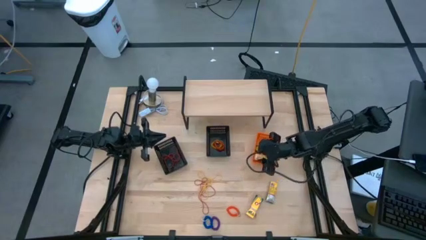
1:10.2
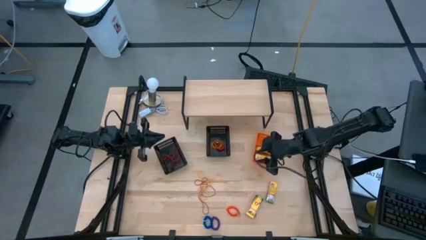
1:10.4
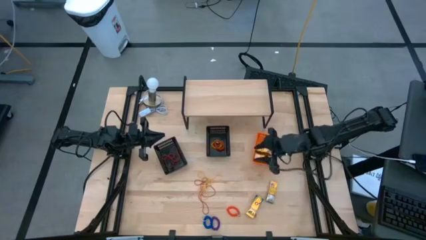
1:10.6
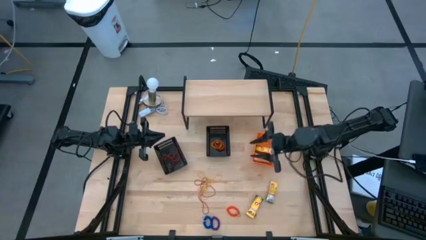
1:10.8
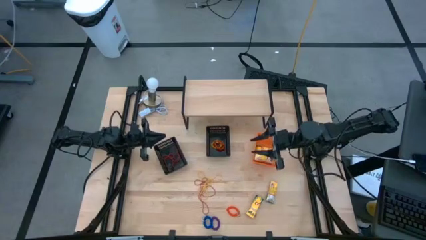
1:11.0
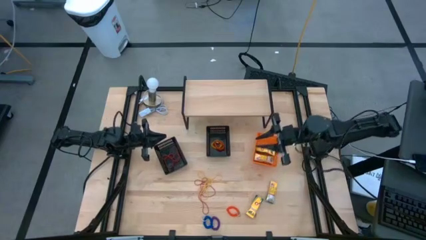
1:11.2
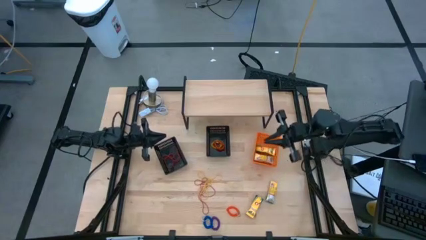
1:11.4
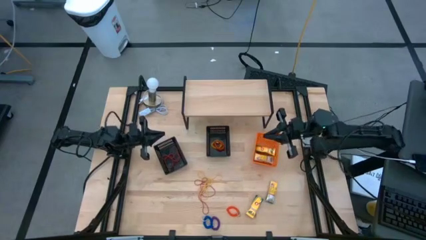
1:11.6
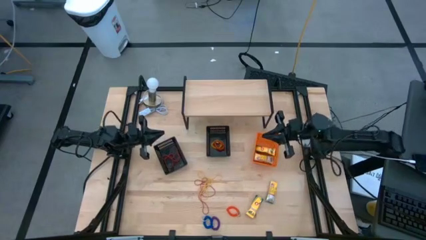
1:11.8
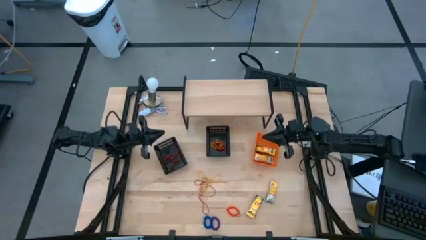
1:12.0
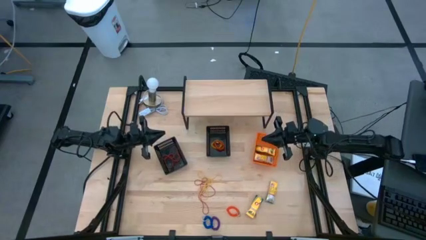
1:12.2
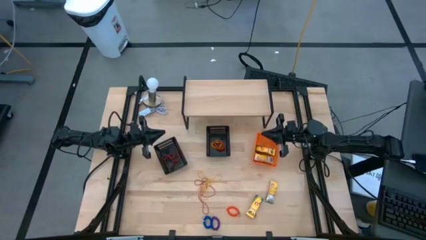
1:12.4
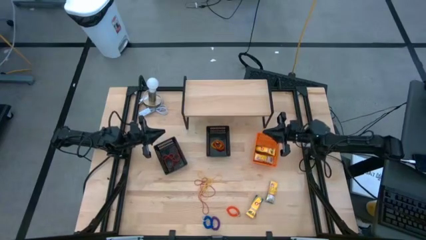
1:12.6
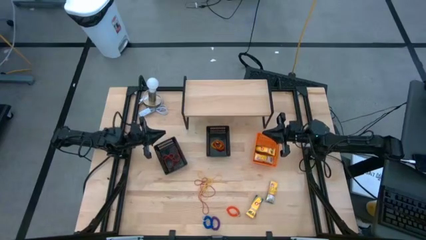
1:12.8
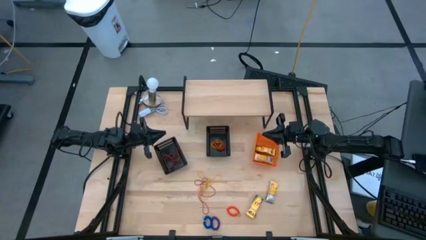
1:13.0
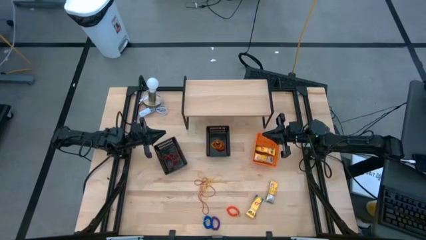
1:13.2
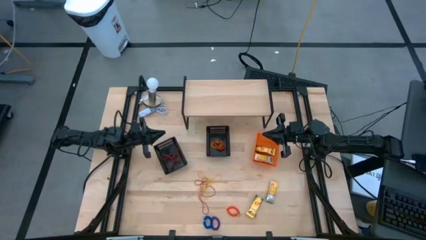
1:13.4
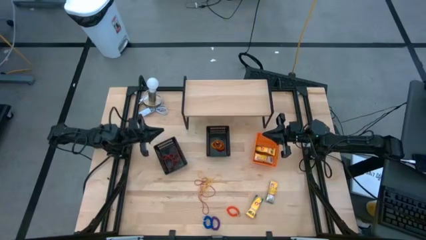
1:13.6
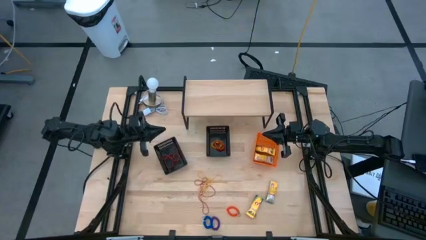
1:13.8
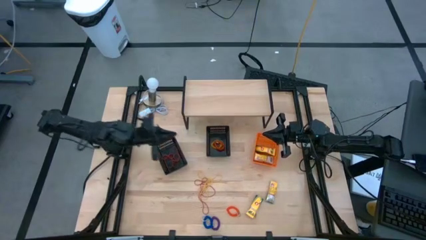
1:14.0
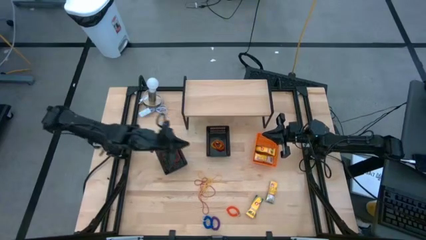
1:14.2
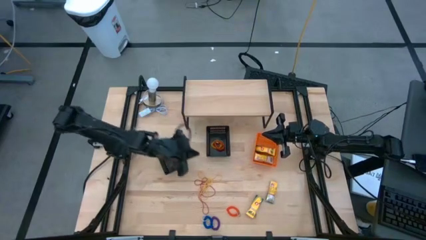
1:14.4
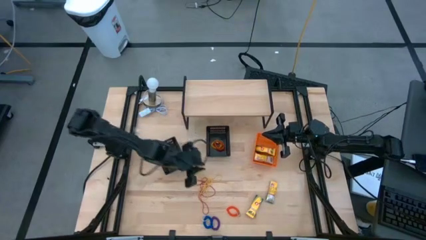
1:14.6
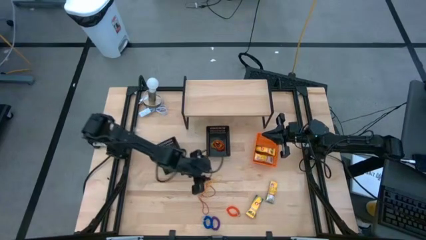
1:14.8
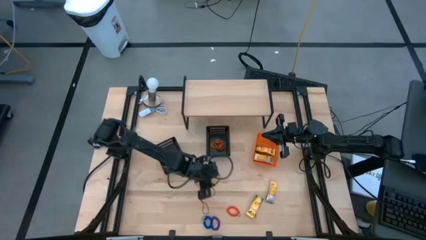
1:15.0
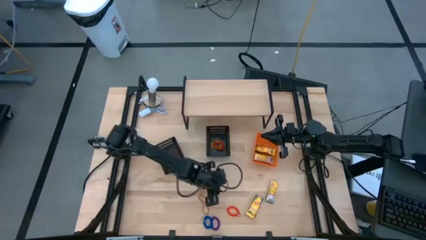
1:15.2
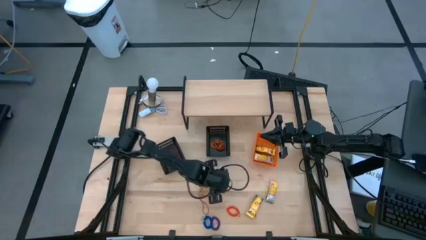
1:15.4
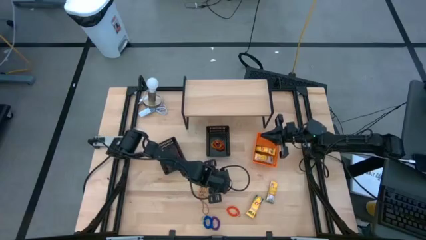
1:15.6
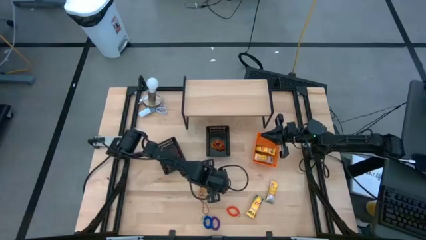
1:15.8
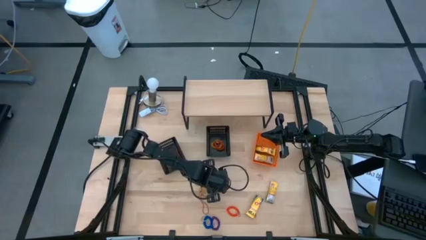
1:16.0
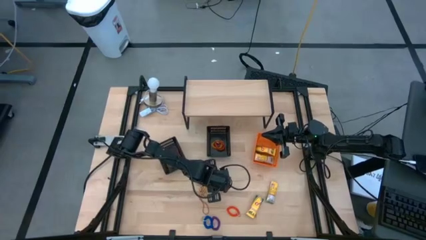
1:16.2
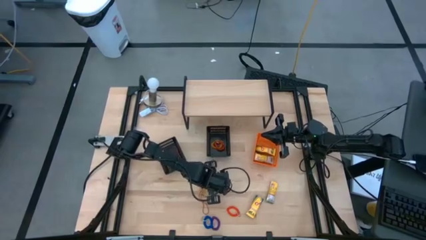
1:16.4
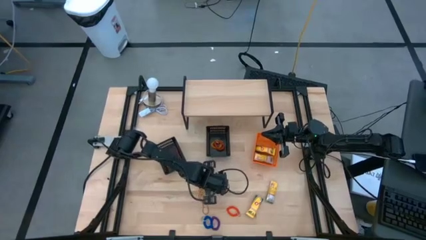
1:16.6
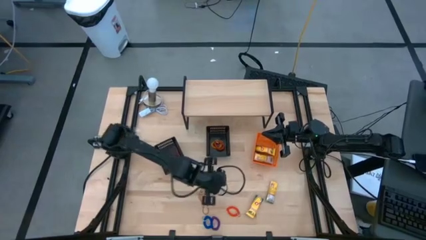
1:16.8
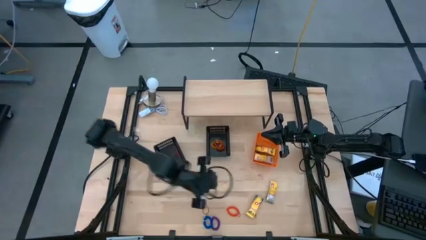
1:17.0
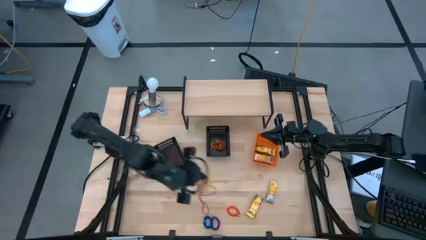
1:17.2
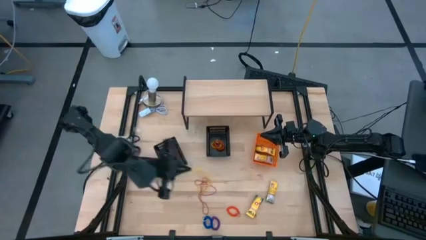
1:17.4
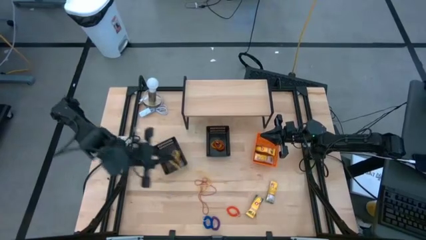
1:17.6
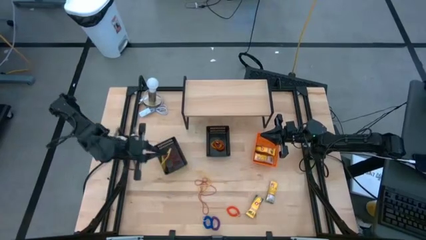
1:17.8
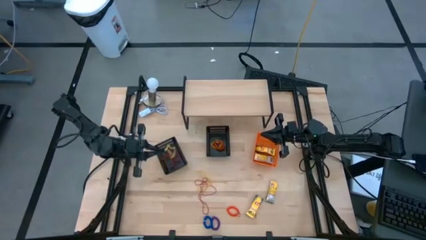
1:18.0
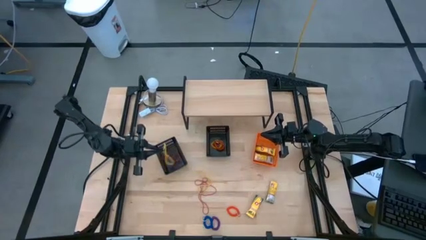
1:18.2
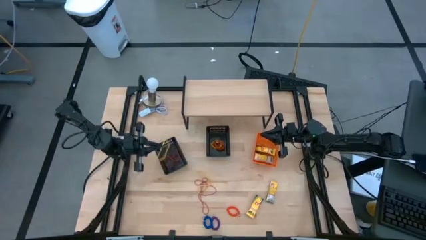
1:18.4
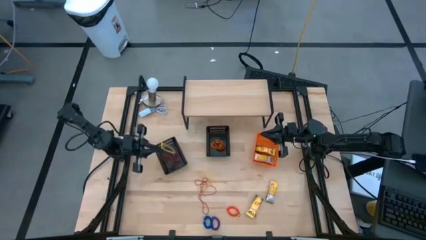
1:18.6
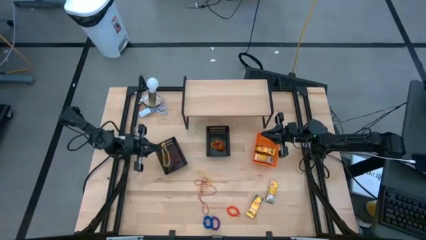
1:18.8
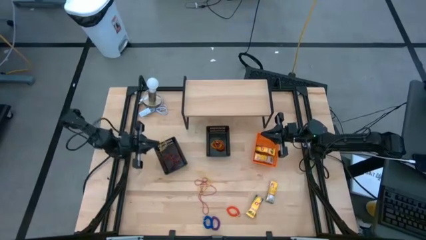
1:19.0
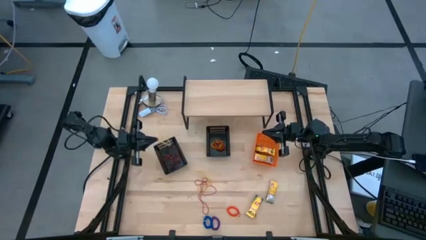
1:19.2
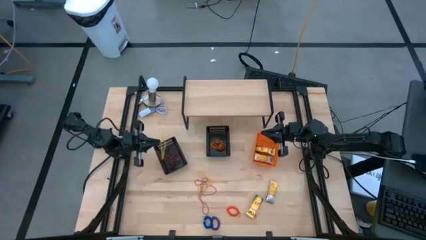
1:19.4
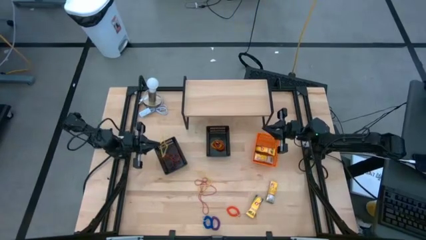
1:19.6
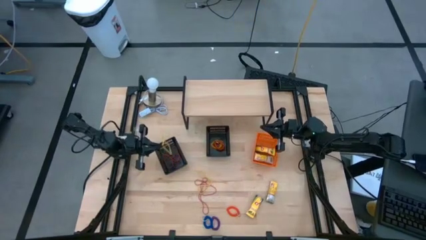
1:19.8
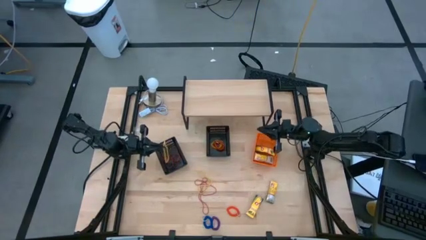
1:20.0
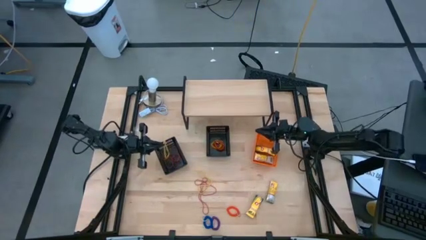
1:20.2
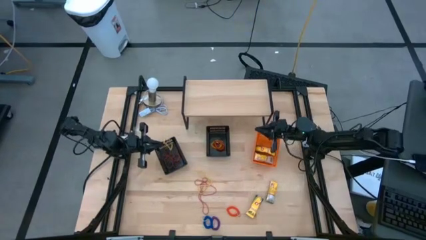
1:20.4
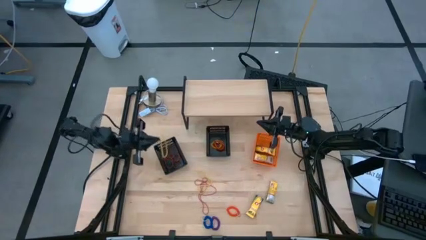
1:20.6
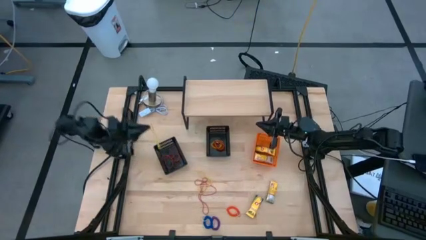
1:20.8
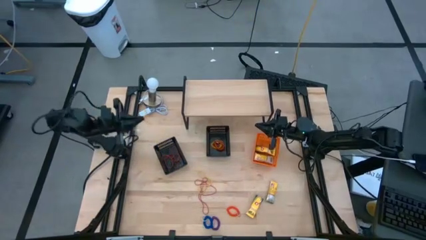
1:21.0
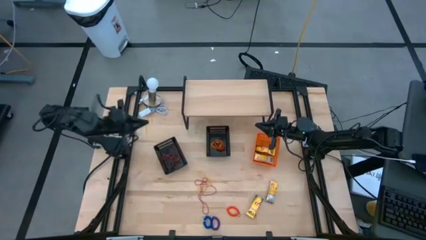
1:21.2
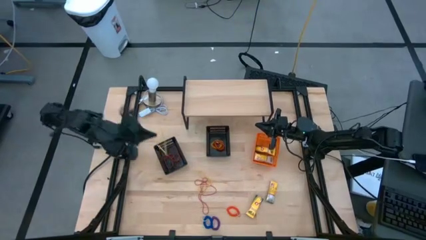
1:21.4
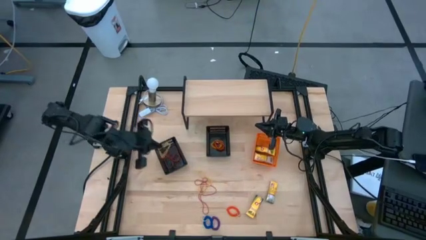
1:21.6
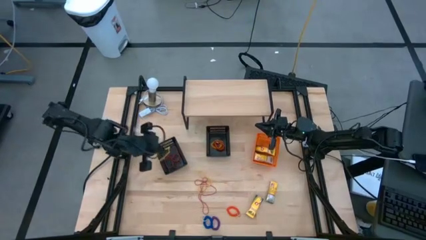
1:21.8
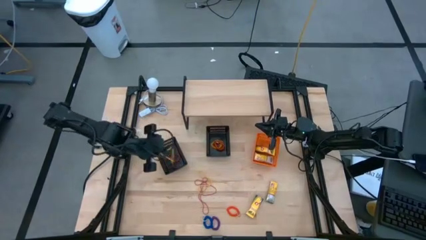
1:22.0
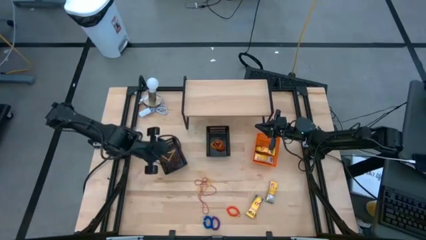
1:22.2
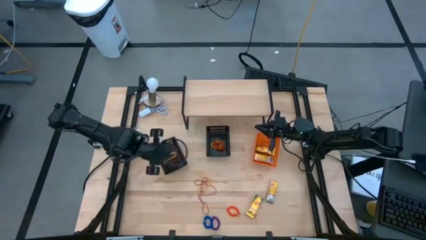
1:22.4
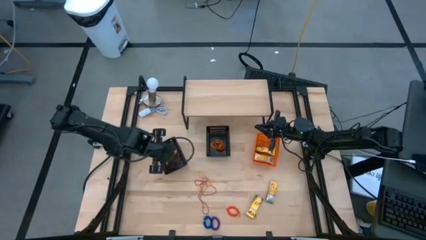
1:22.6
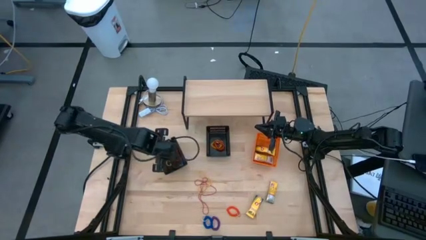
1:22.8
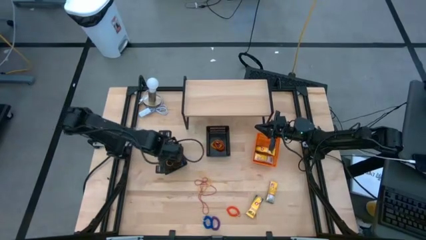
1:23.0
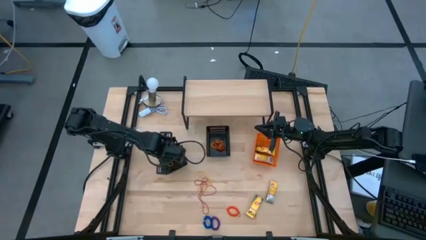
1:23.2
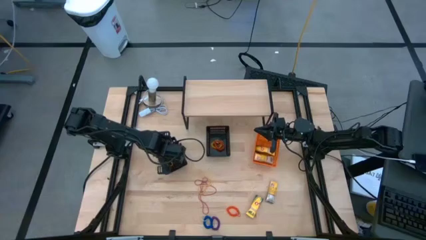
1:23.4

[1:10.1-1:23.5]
Task: Pick & Place Office Desk Supplies
Put the yellow rubber band into the left black basket
